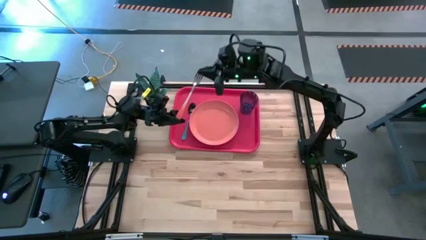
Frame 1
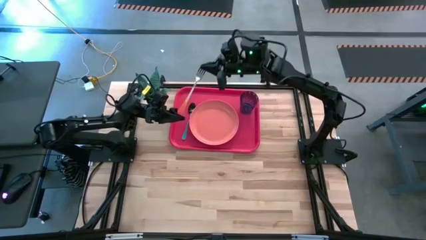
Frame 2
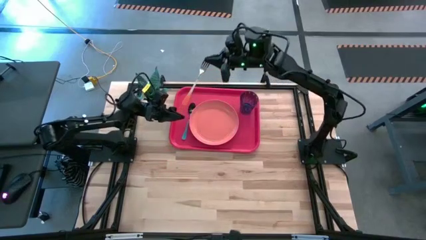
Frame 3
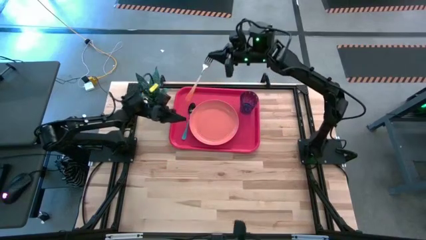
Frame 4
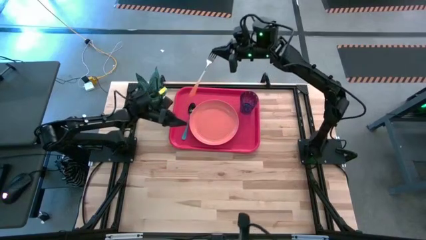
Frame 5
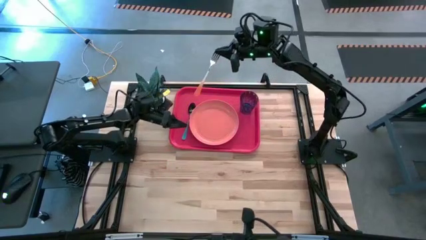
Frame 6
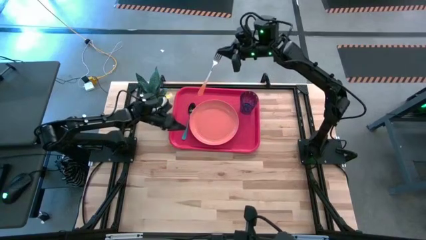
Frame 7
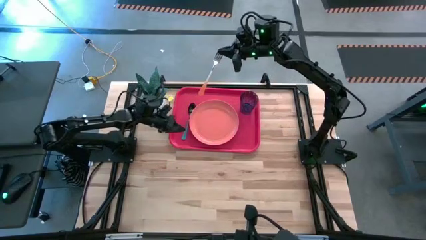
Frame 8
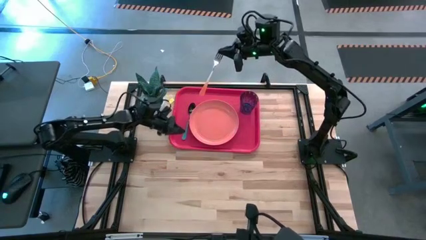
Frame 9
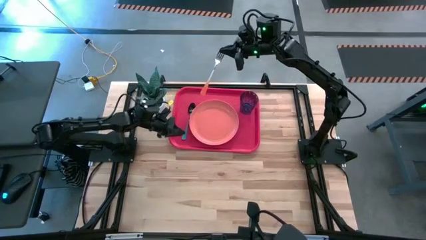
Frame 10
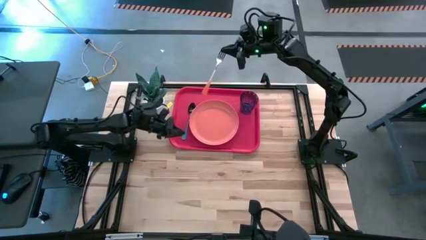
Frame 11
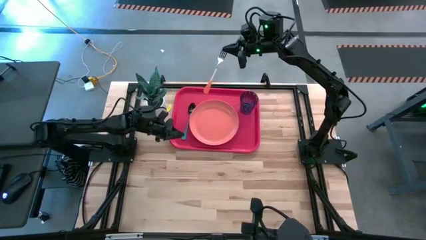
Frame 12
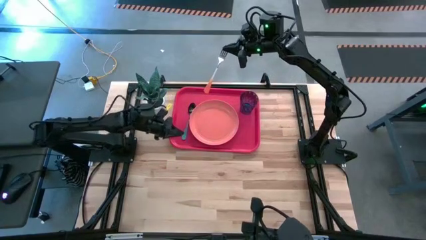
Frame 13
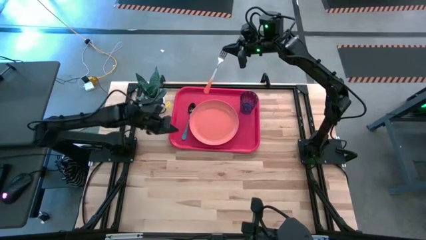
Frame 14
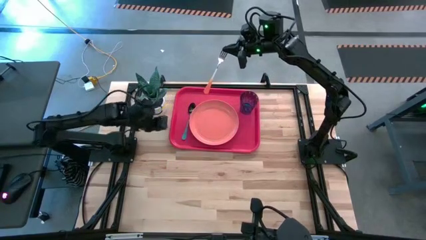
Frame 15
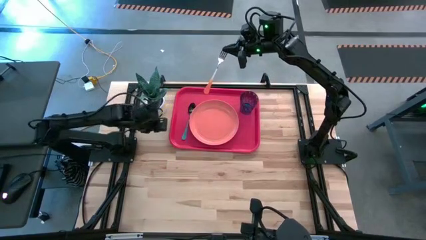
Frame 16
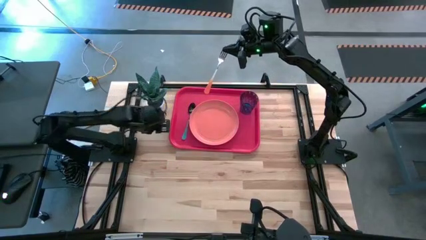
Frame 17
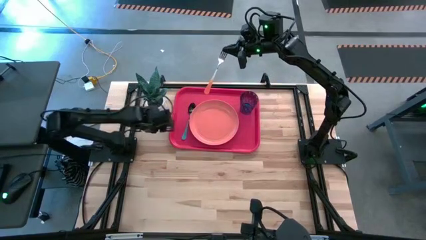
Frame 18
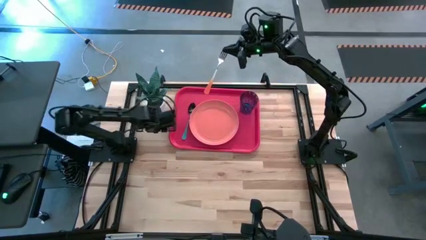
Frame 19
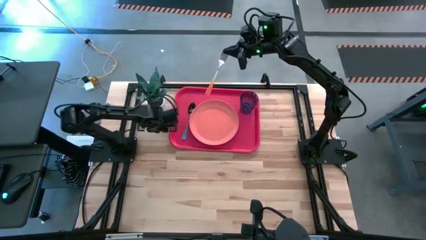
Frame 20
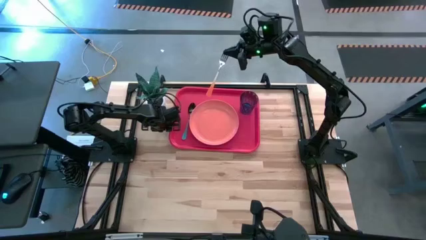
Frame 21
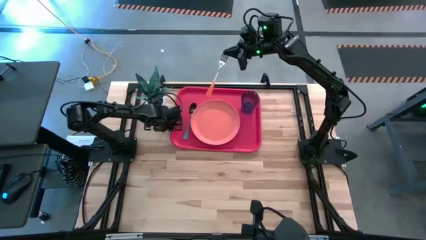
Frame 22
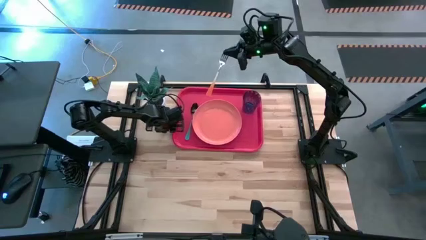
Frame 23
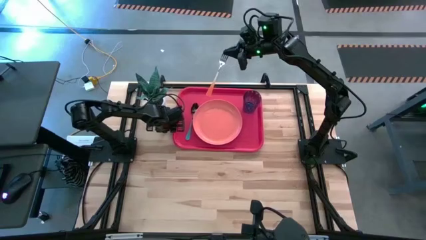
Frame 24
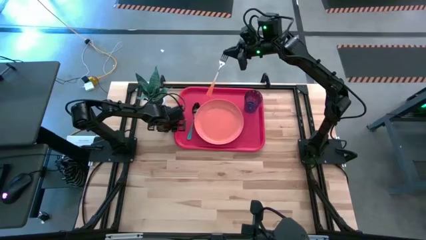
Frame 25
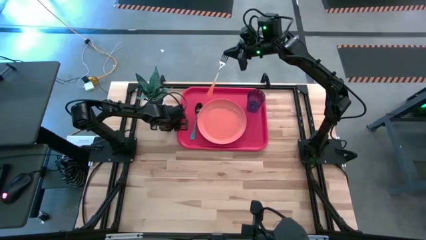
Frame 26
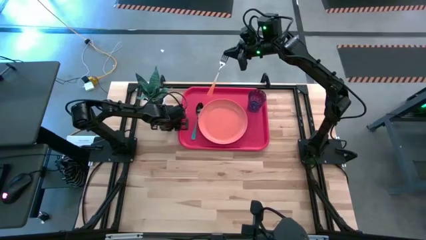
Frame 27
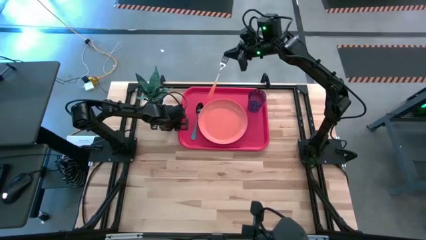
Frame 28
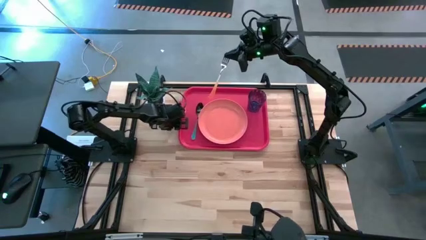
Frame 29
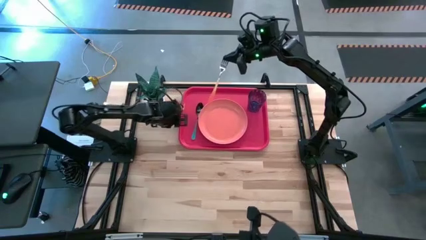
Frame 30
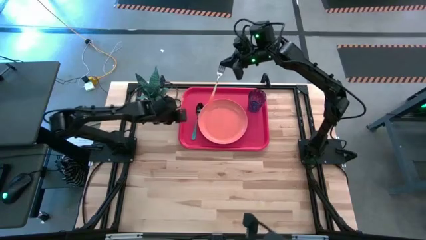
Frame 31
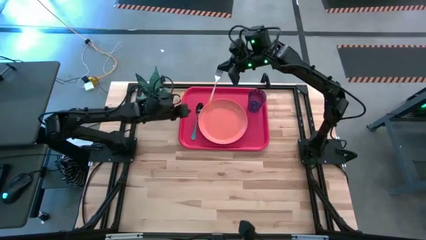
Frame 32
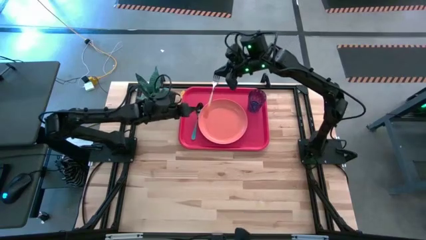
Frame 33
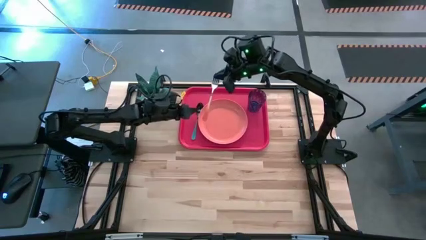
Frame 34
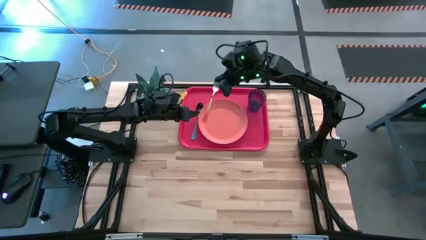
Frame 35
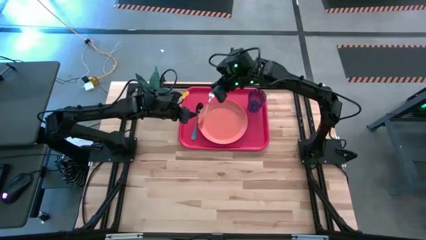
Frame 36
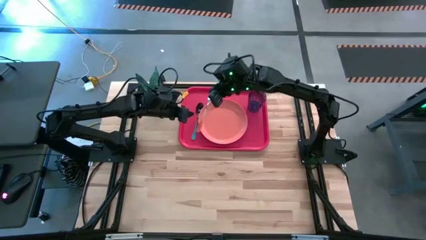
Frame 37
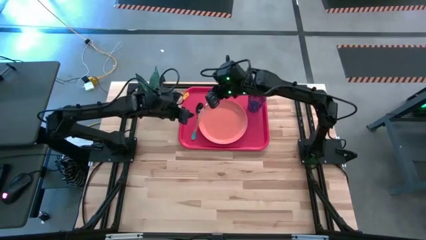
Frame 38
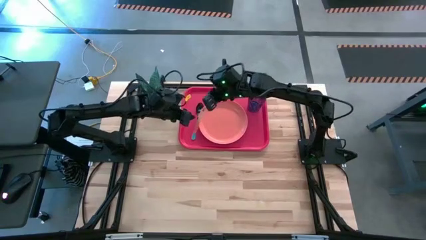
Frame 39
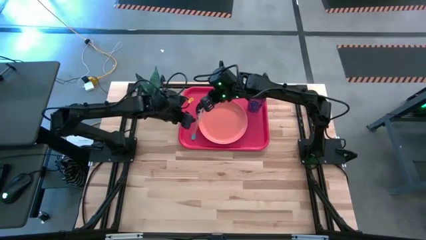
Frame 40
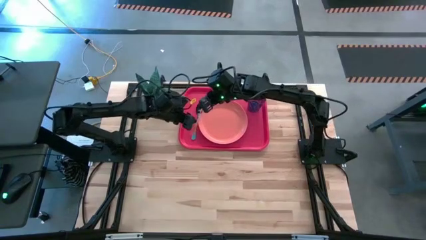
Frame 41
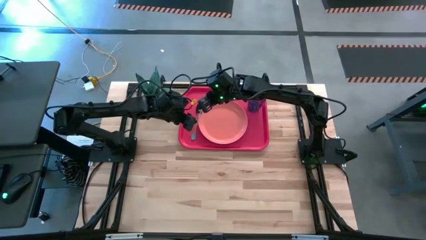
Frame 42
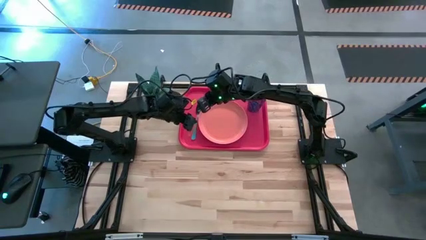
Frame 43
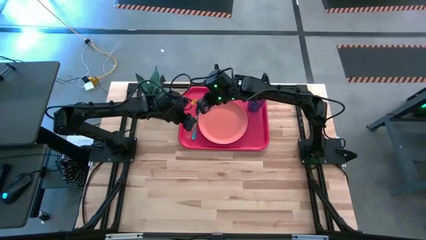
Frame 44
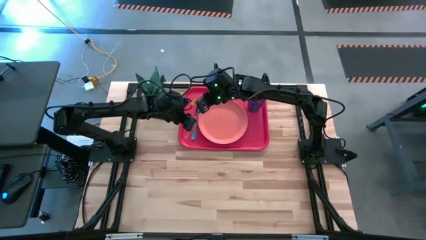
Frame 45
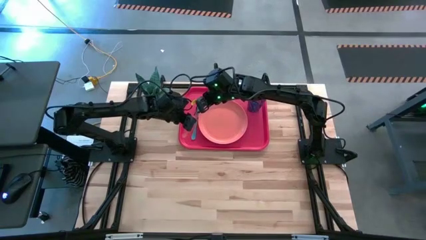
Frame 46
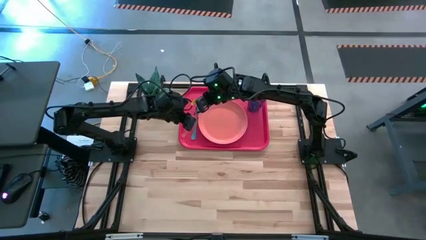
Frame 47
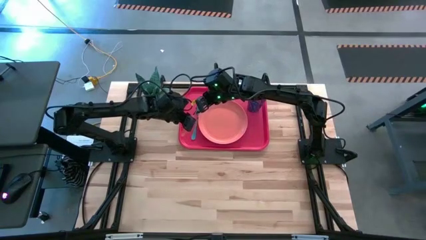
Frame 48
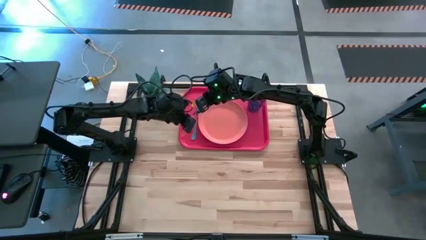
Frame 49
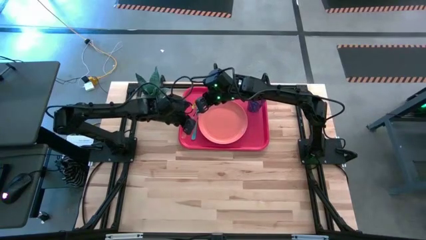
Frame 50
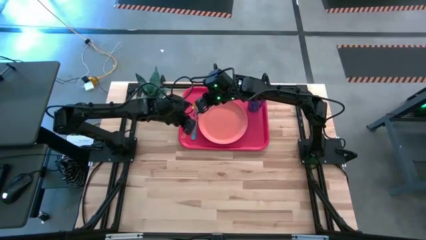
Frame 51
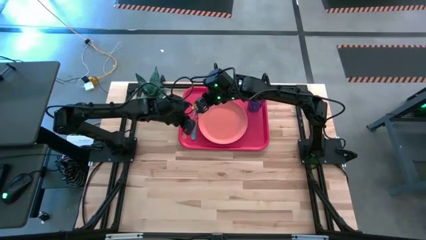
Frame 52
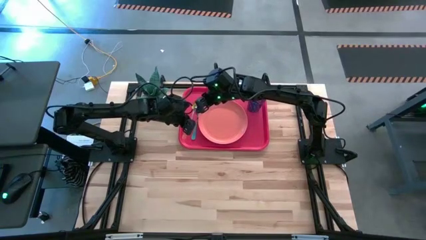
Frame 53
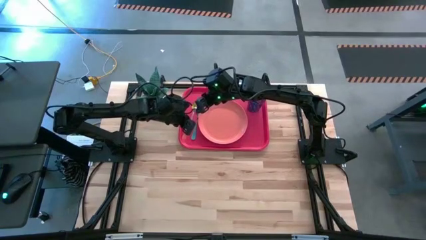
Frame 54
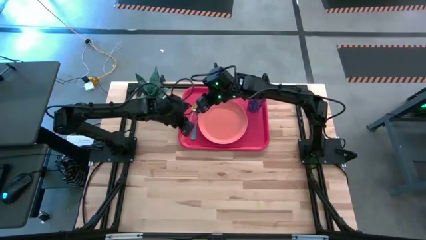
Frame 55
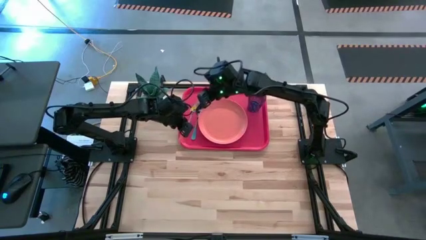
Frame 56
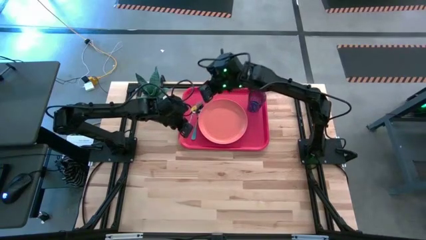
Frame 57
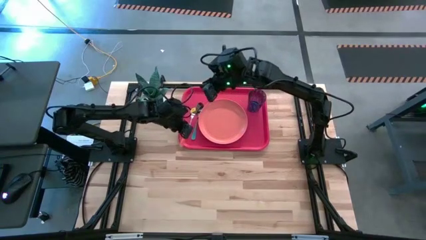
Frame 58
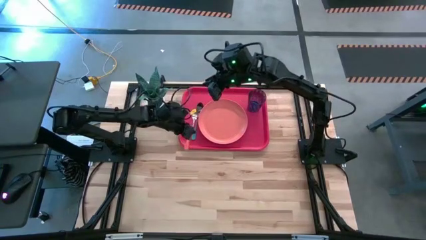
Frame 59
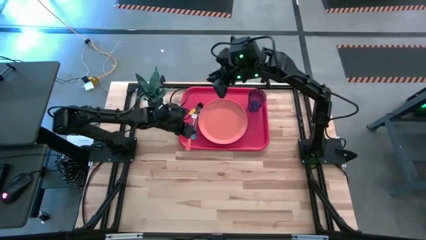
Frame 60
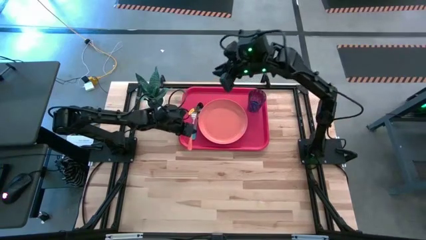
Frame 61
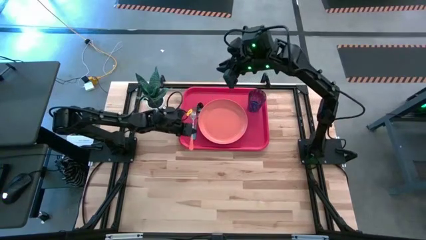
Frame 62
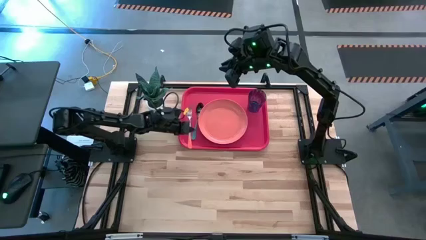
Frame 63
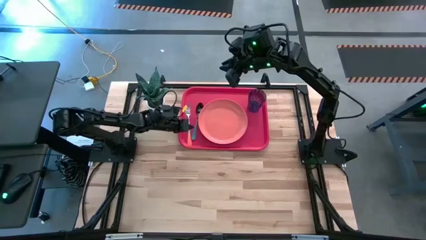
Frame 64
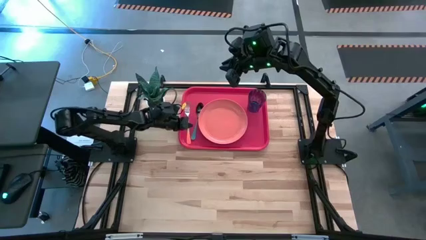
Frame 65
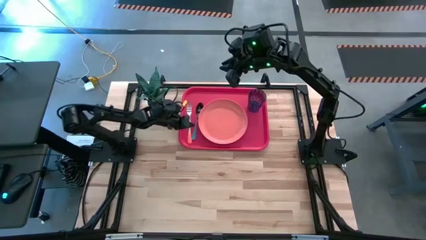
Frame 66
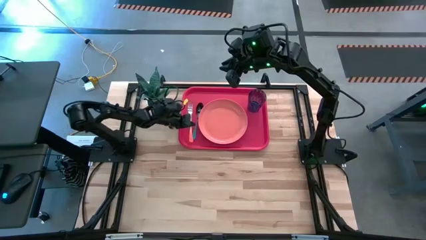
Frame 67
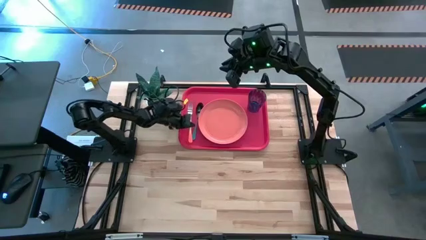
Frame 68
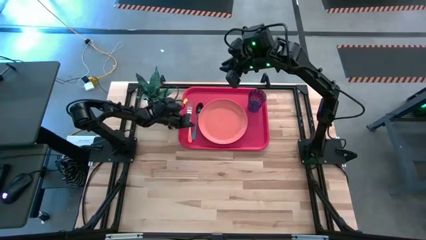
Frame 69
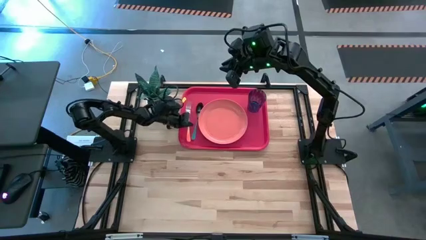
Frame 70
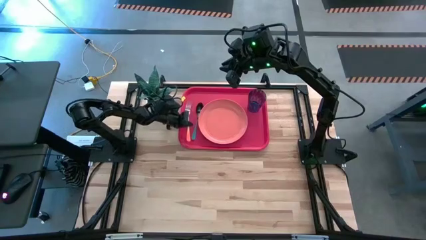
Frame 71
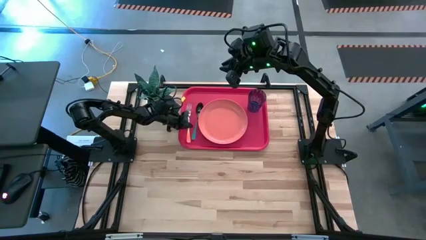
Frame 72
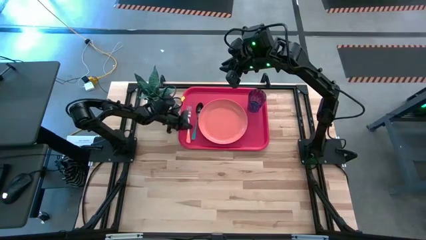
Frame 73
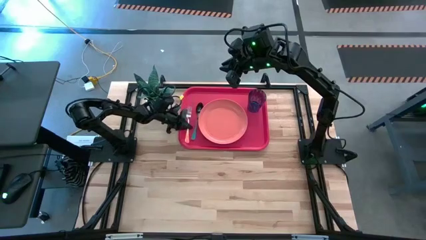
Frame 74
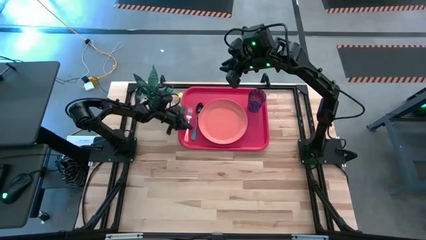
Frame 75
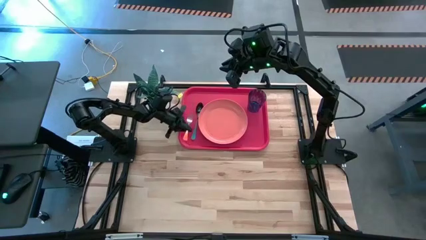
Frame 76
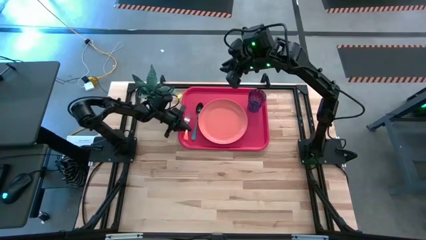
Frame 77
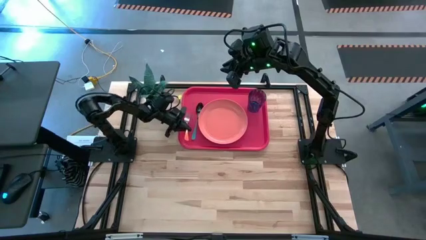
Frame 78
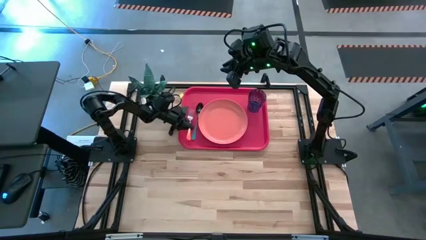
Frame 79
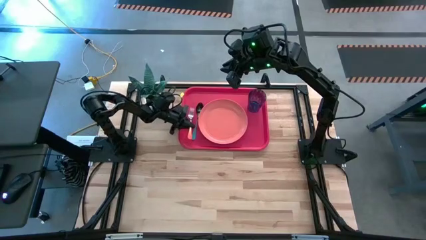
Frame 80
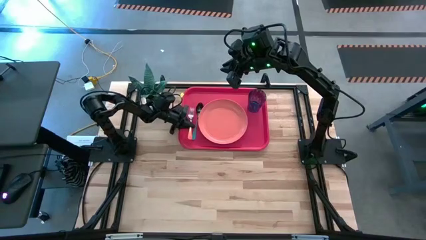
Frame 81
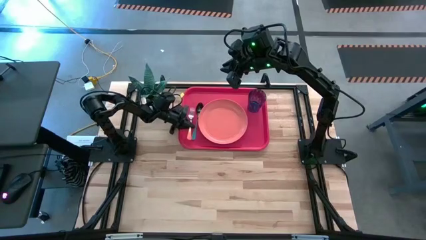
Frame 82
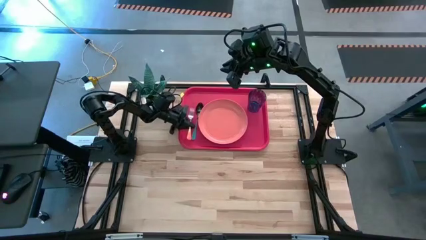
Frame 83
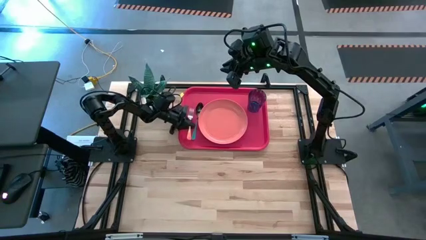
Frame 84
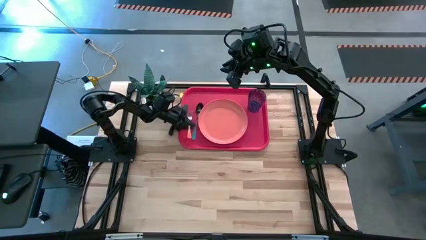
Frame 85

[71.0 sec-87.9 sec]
Task: Pick and place plate/cup/fork/spoon on tray
Adjust the utensils on the pink tray
